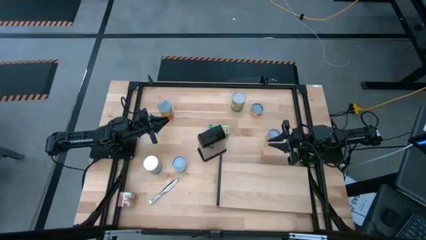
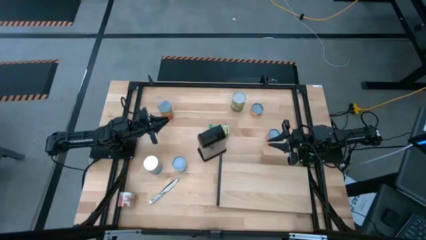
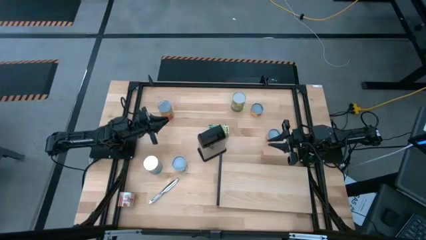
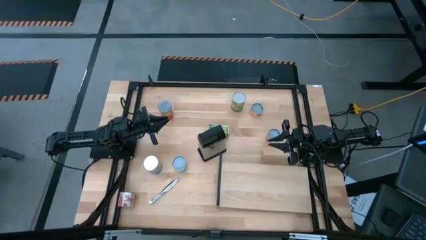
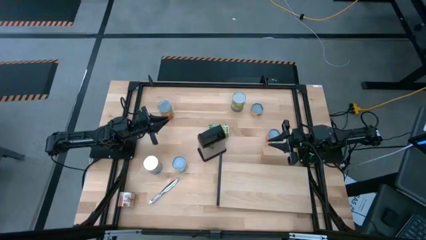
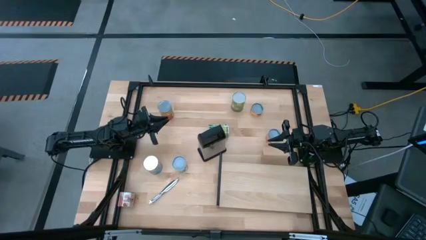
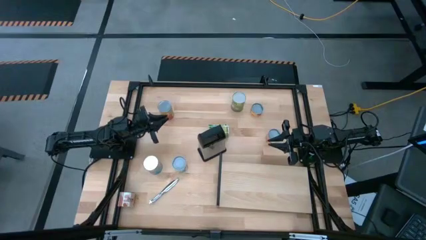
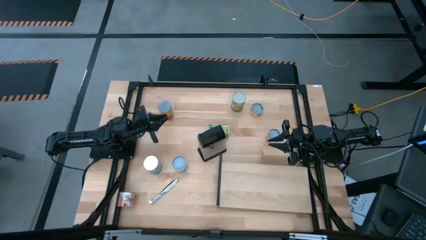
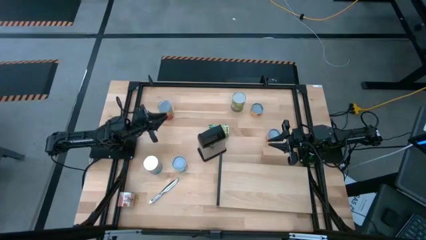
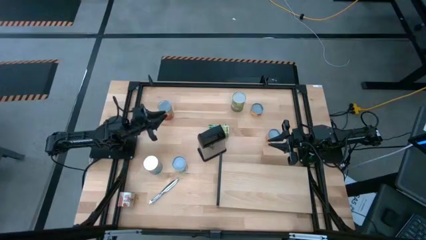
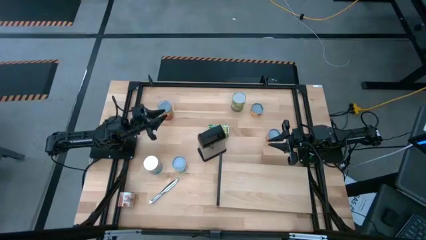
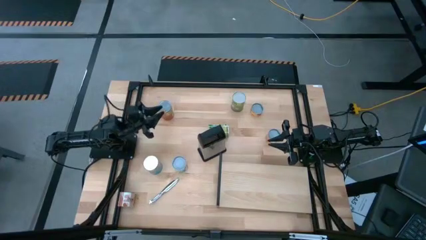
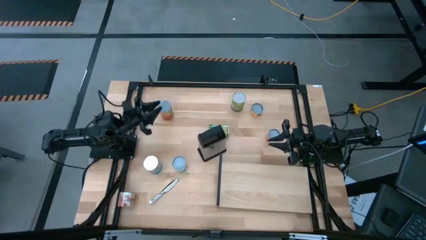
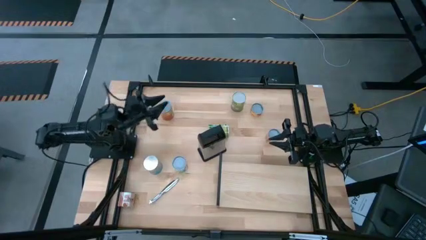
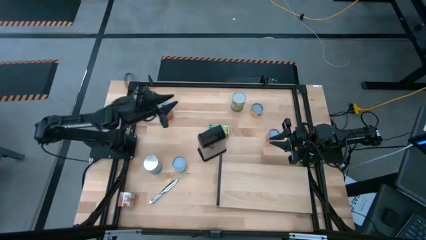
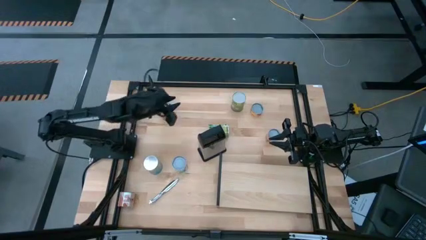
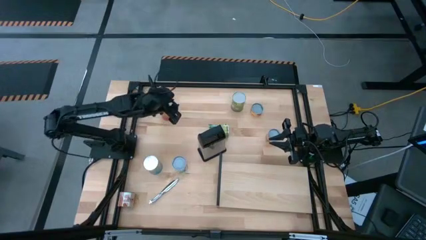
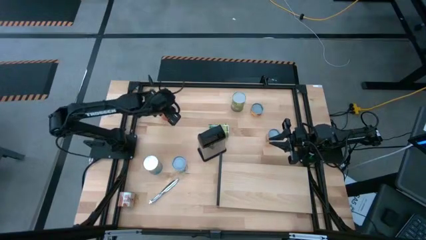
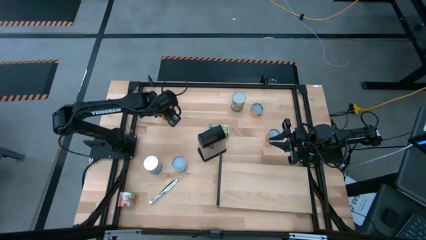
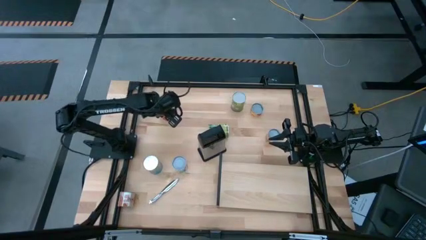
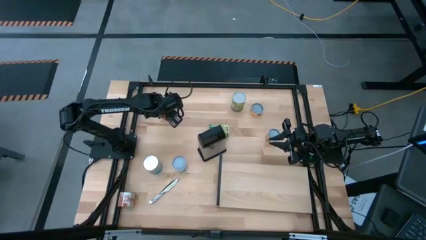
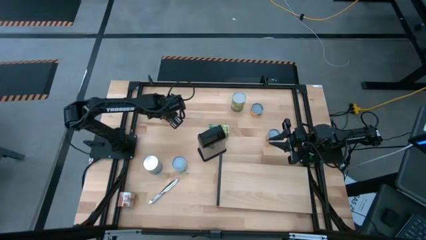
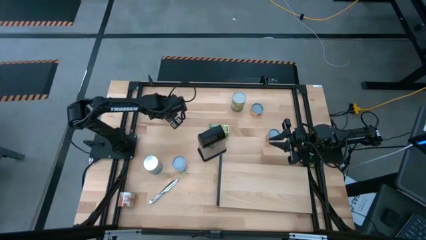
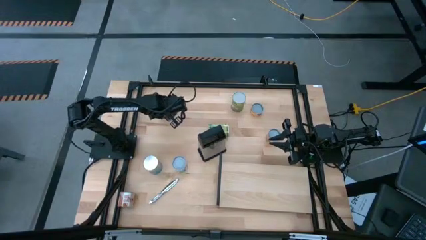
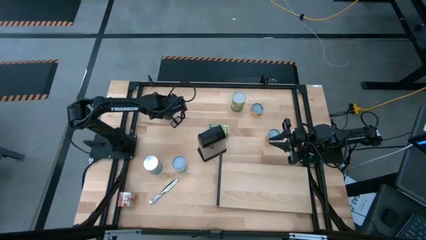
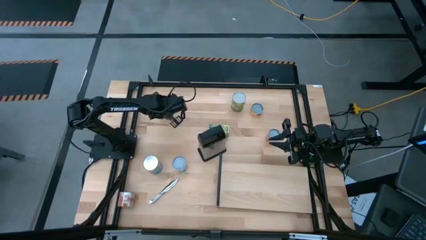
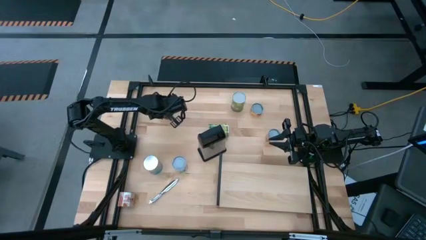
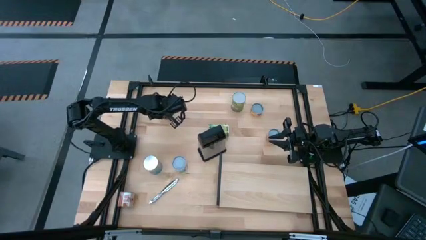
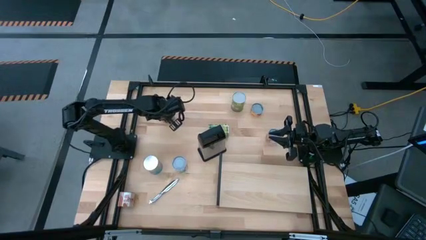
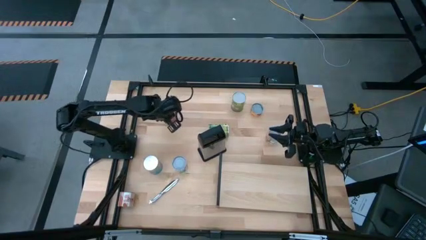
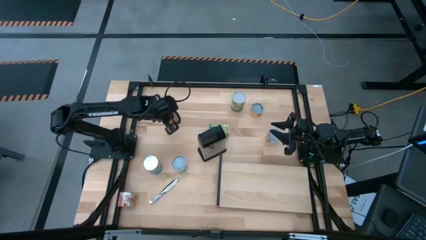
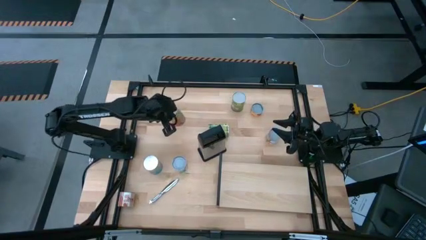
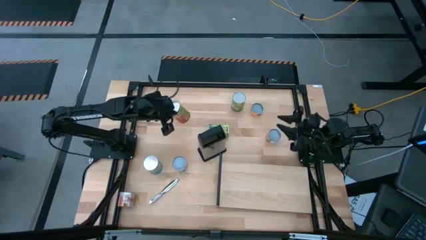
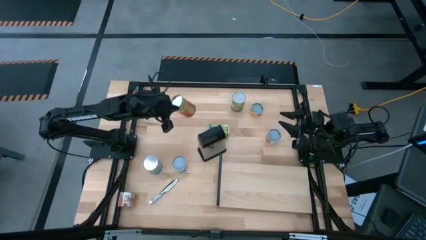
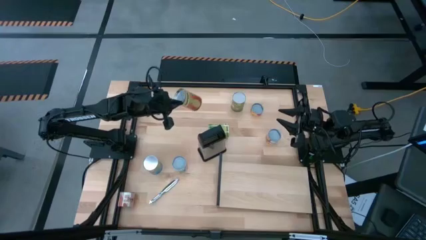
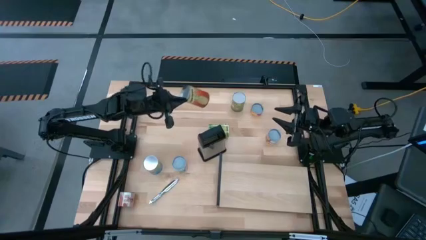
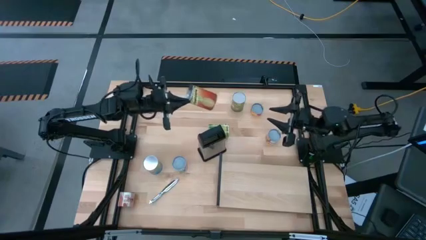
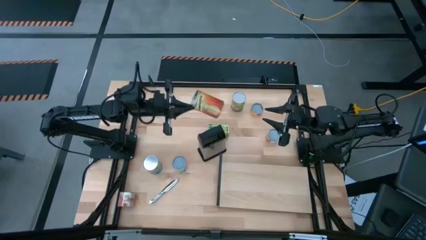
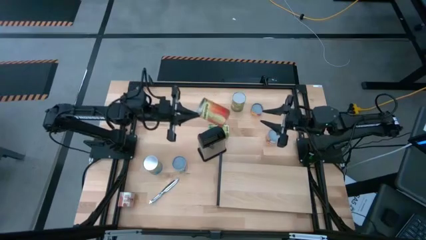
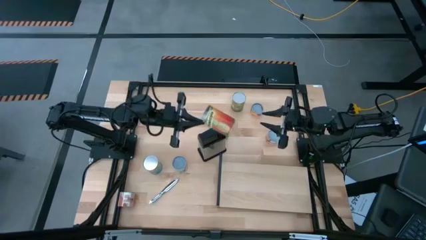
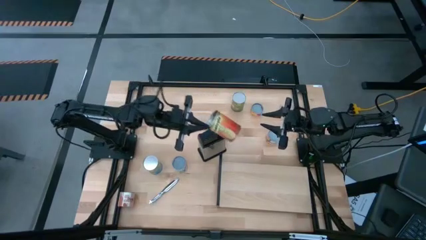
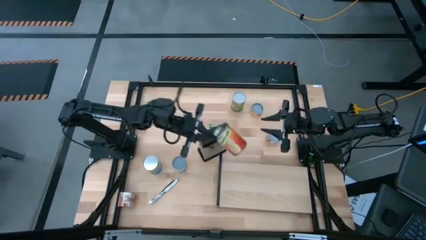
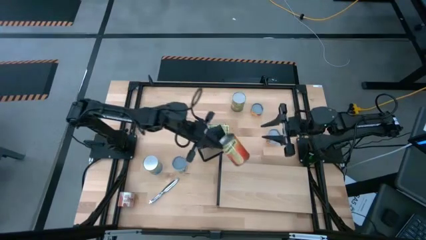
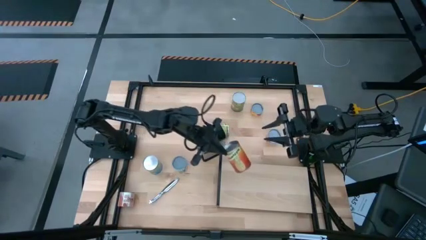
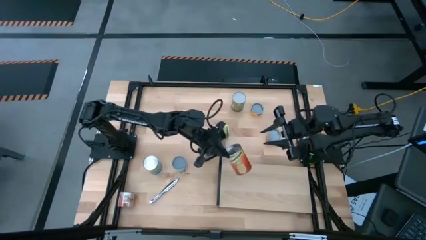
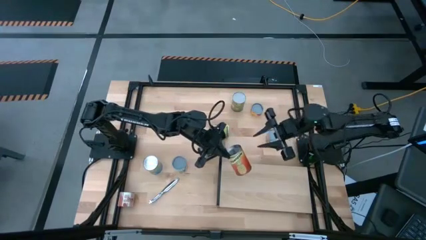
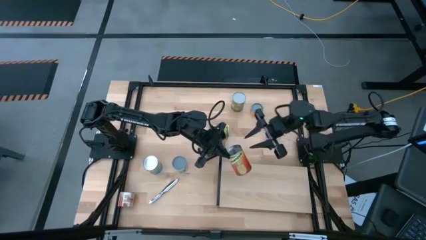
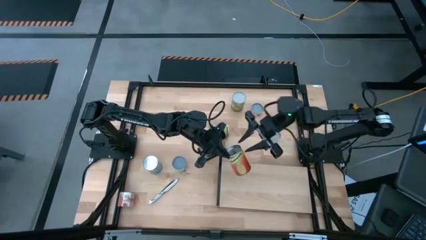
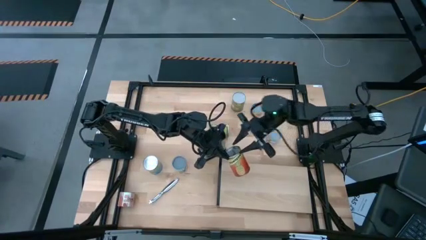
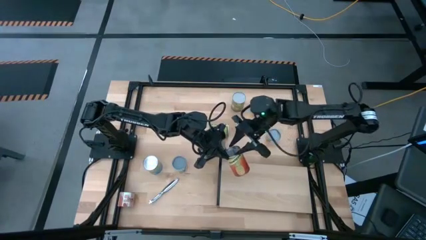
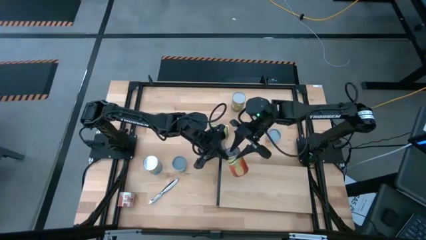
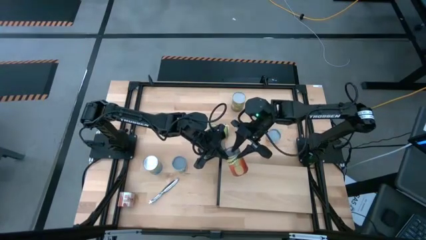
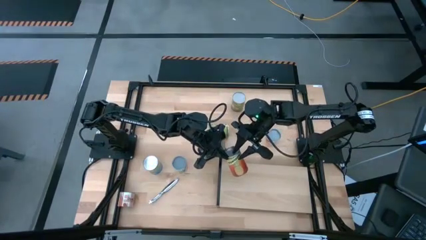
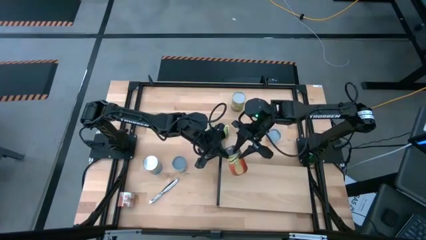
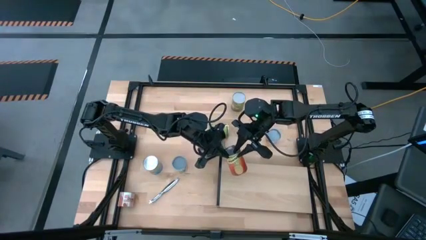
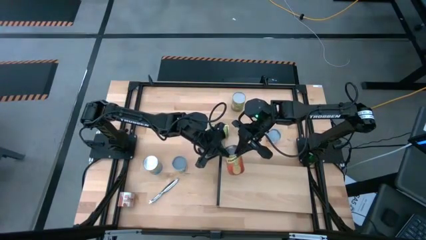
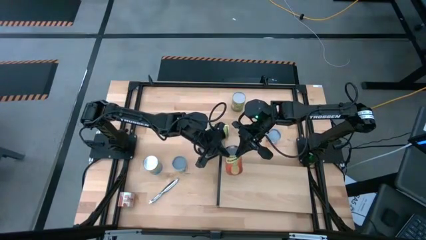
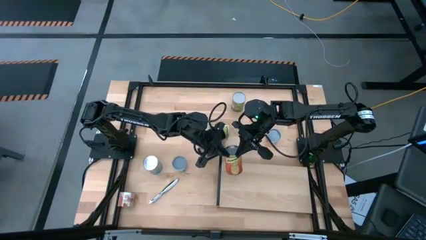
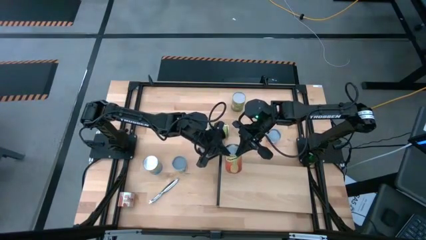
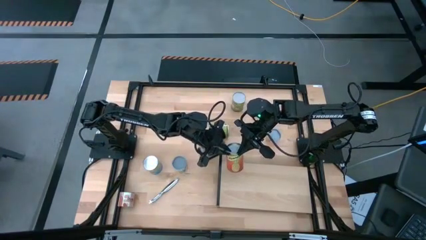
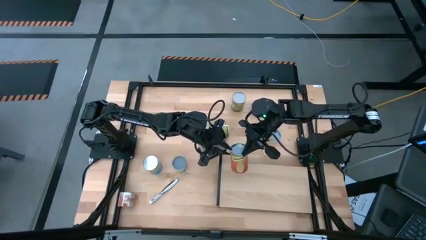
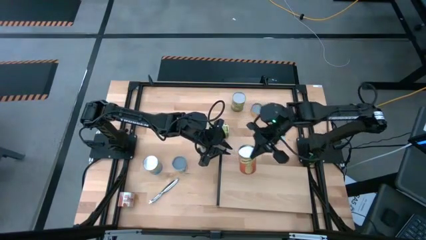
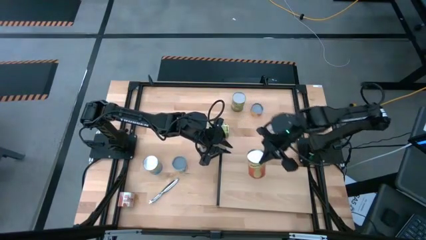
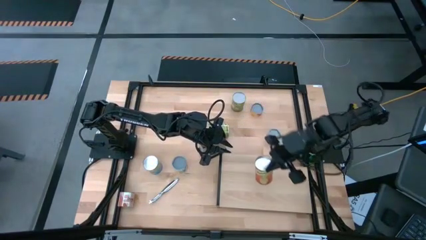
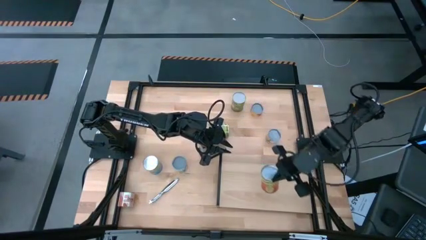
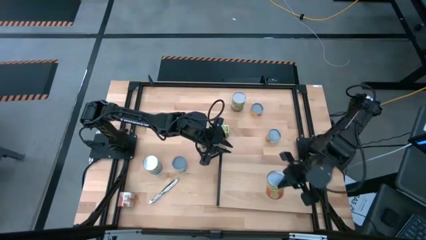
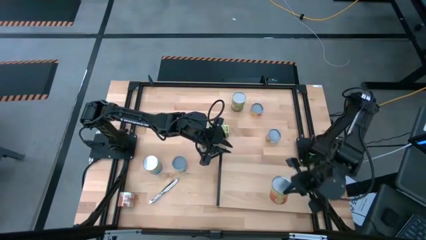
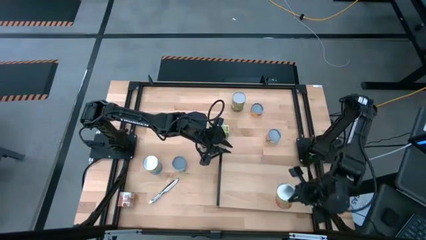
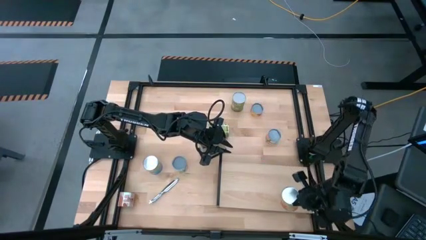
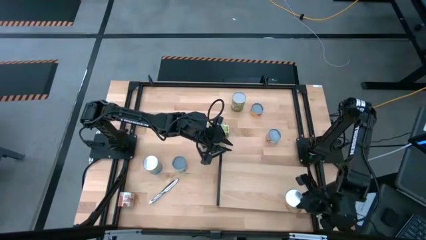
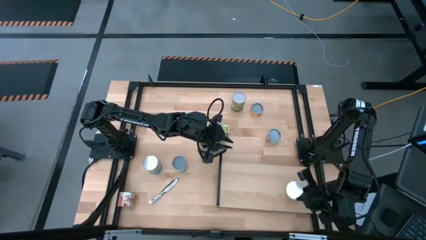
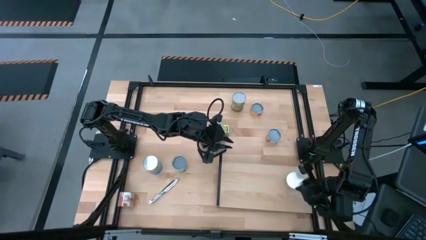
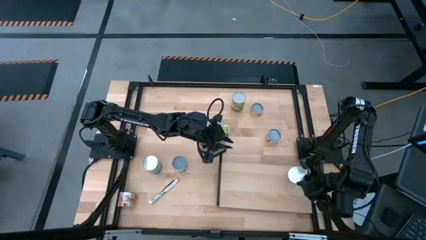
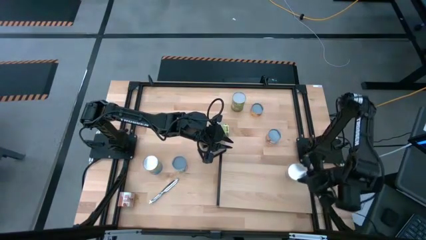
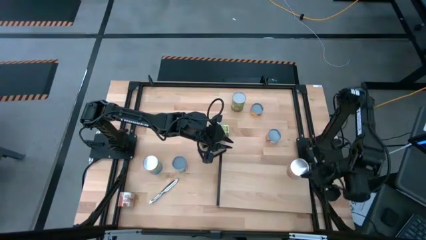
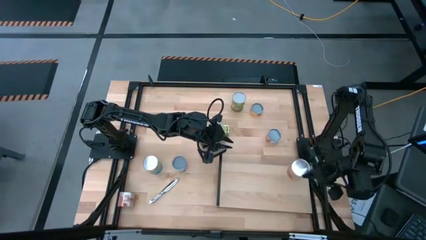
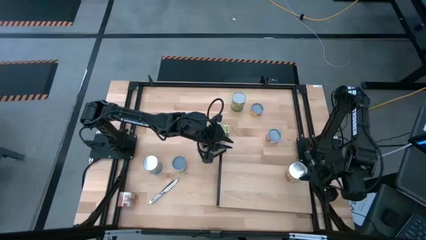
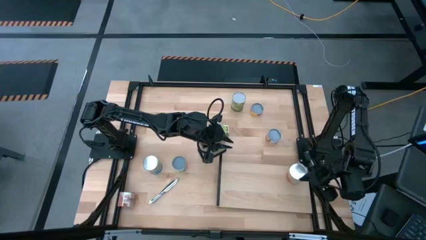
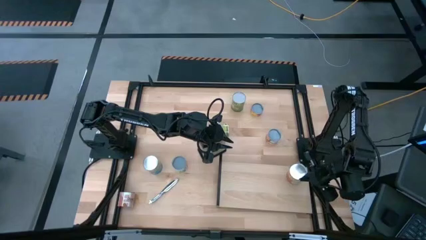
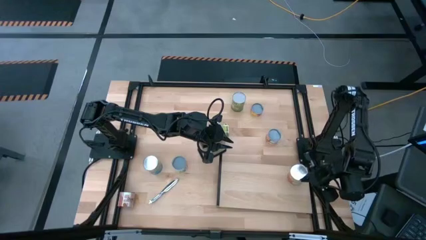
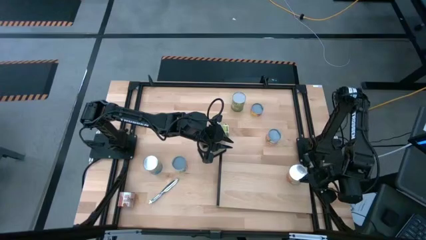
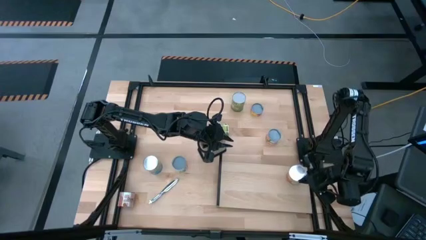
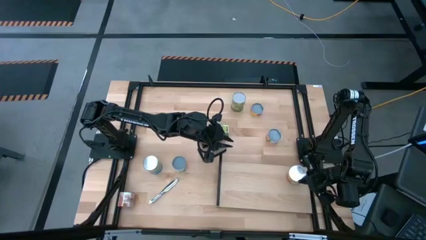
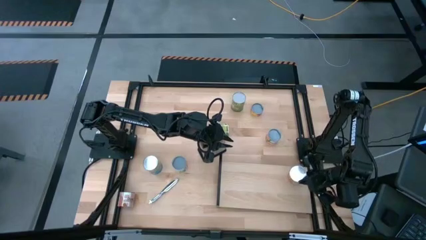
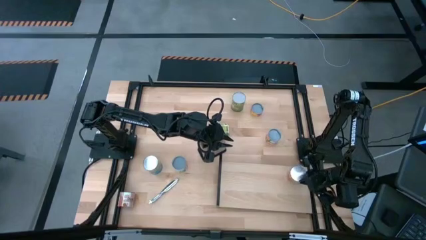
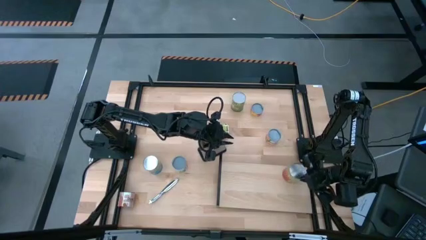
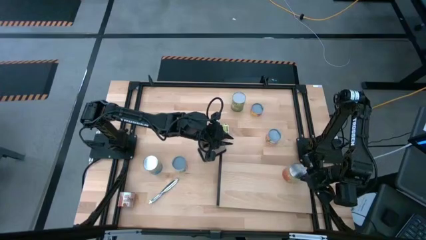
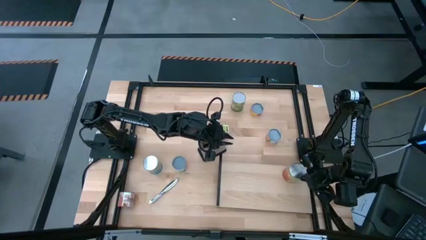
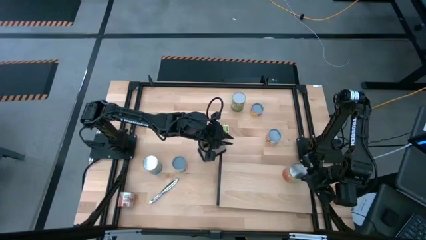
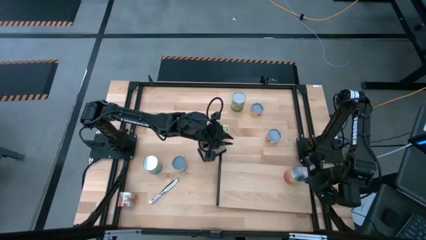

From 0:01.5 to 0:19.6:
Task: Pick and place cans onto a shelf
Put the large canned pineapple on the shelf
